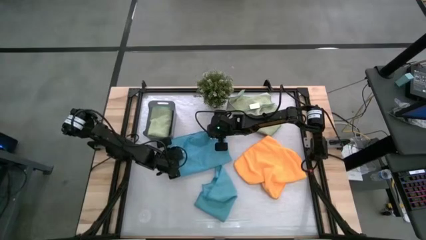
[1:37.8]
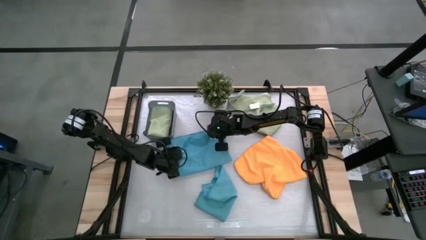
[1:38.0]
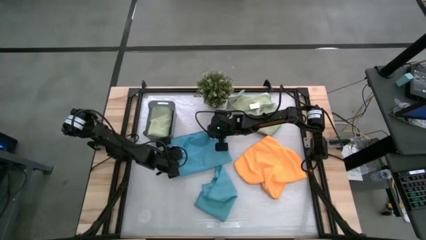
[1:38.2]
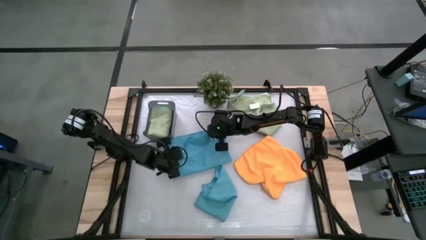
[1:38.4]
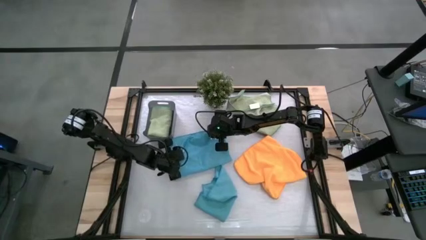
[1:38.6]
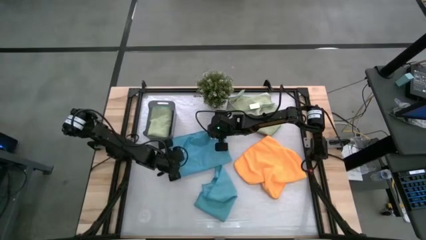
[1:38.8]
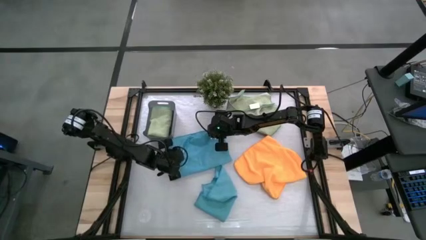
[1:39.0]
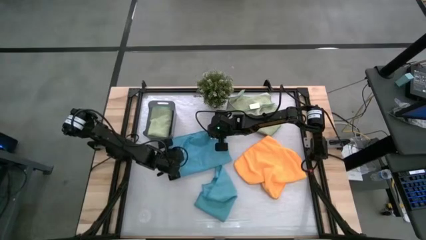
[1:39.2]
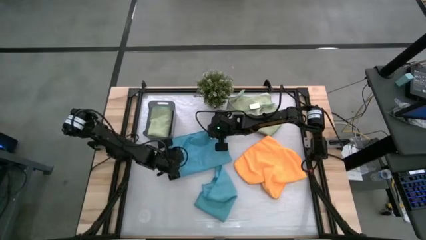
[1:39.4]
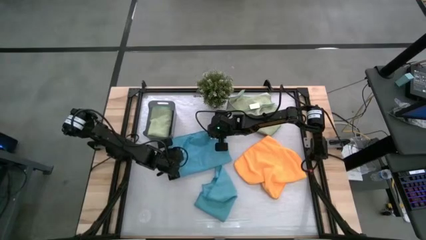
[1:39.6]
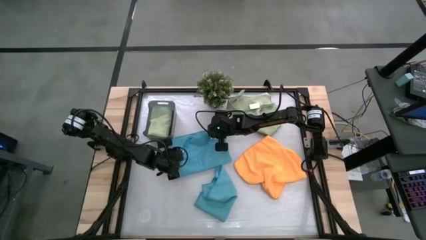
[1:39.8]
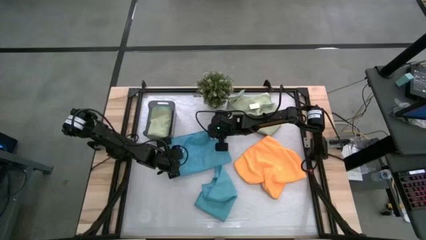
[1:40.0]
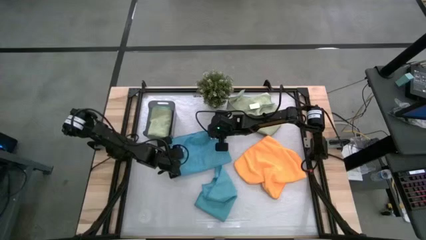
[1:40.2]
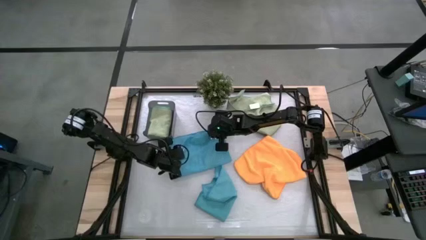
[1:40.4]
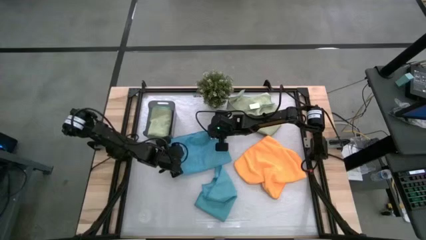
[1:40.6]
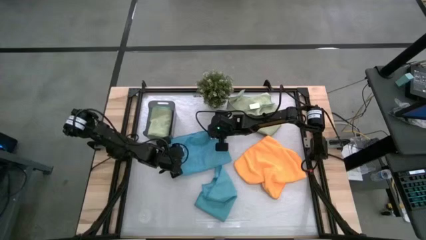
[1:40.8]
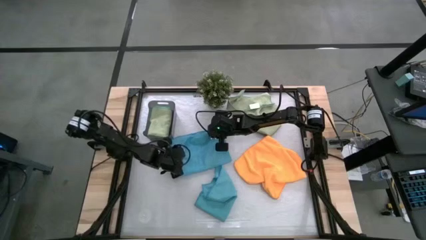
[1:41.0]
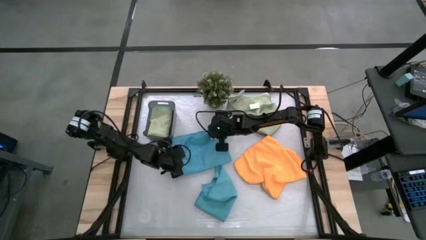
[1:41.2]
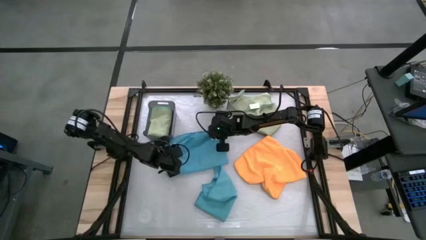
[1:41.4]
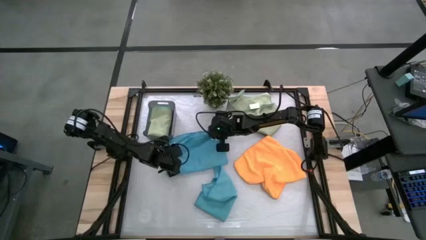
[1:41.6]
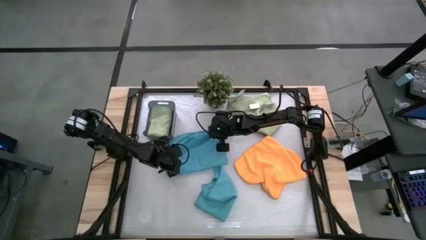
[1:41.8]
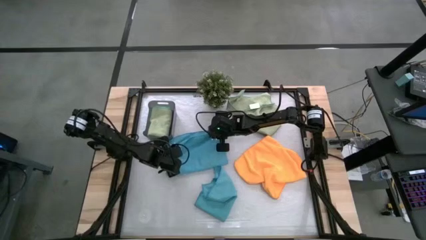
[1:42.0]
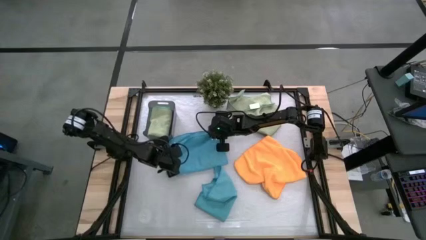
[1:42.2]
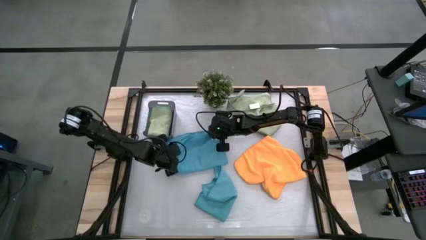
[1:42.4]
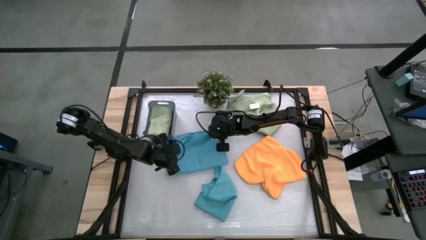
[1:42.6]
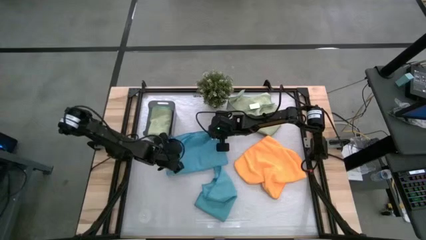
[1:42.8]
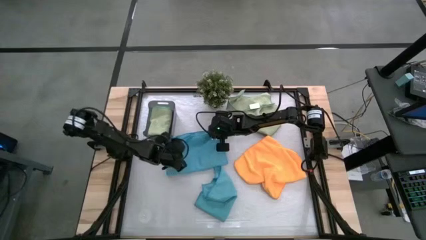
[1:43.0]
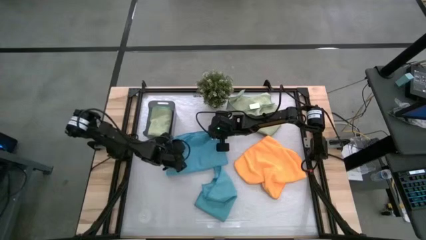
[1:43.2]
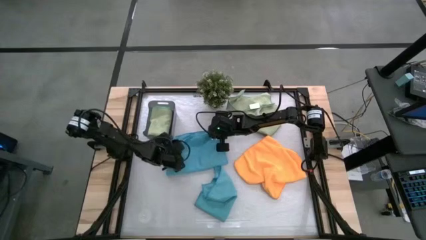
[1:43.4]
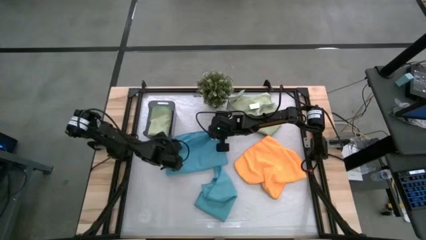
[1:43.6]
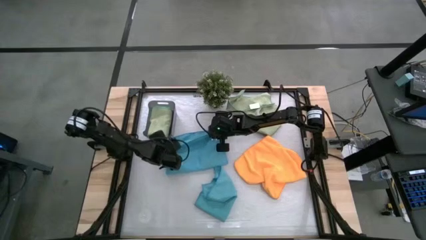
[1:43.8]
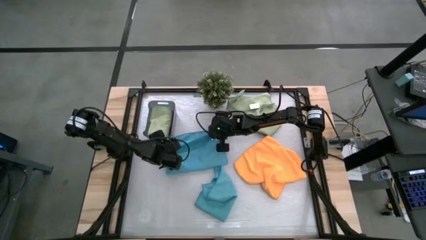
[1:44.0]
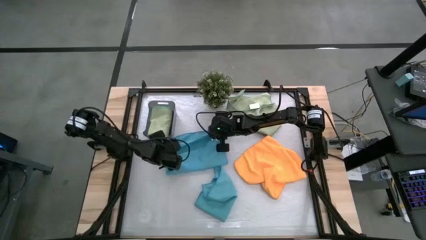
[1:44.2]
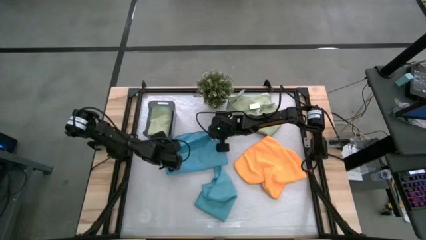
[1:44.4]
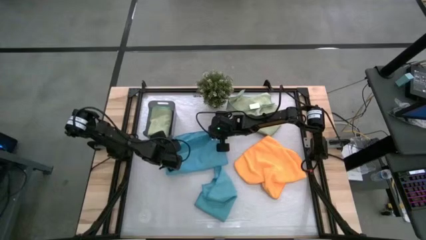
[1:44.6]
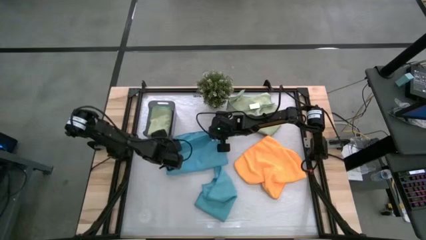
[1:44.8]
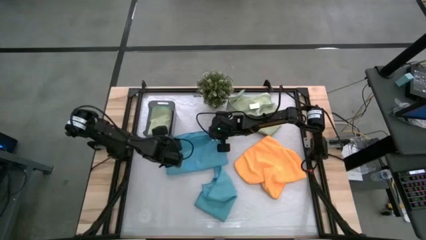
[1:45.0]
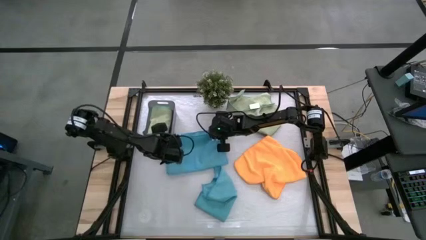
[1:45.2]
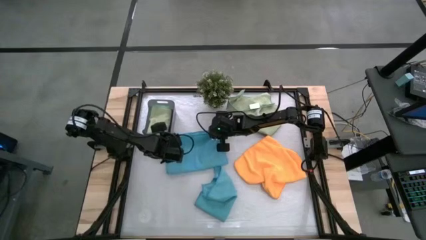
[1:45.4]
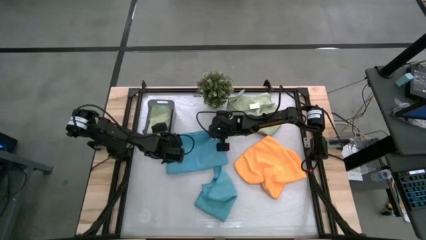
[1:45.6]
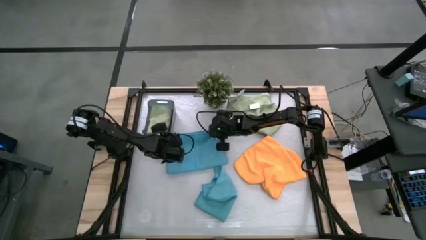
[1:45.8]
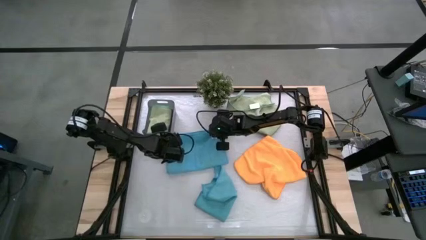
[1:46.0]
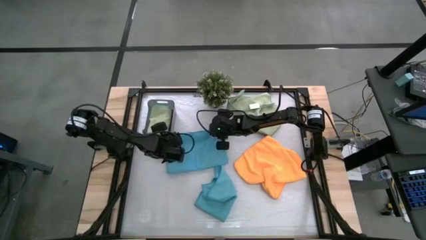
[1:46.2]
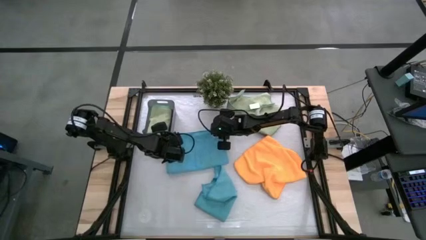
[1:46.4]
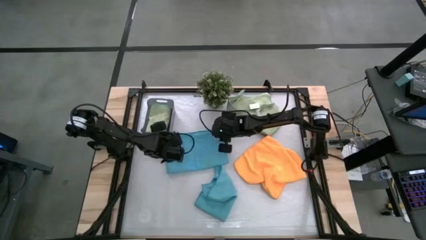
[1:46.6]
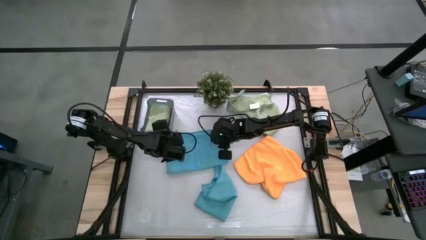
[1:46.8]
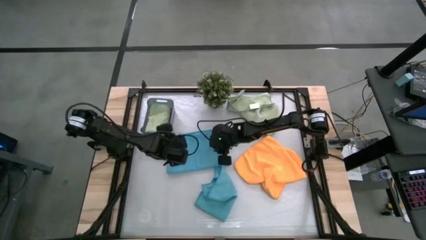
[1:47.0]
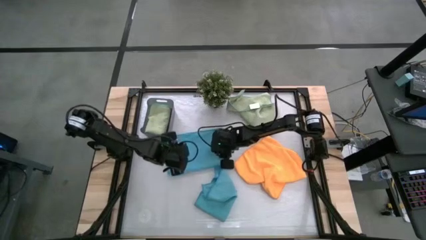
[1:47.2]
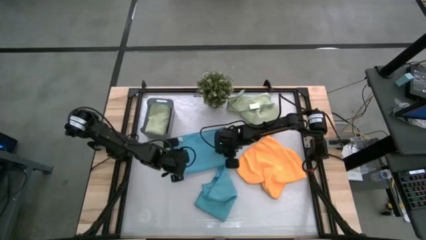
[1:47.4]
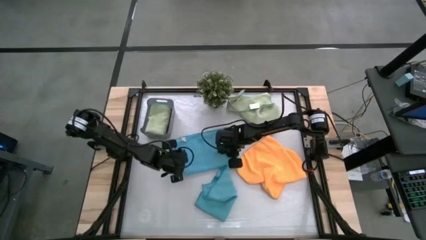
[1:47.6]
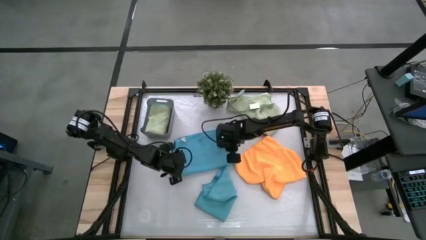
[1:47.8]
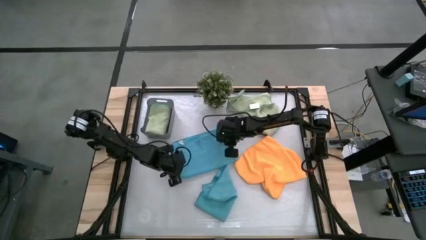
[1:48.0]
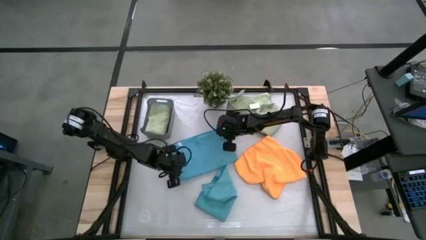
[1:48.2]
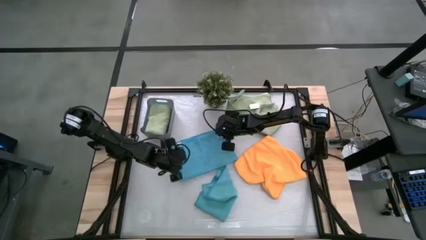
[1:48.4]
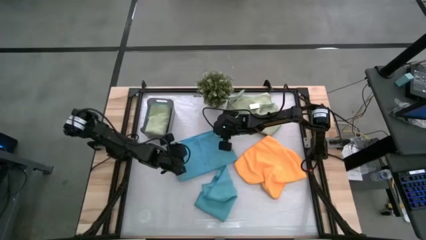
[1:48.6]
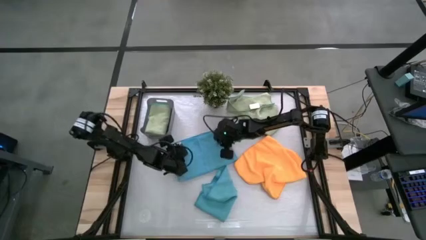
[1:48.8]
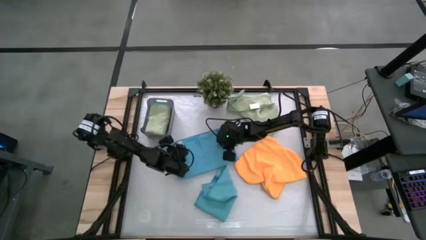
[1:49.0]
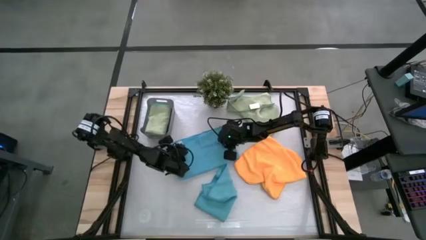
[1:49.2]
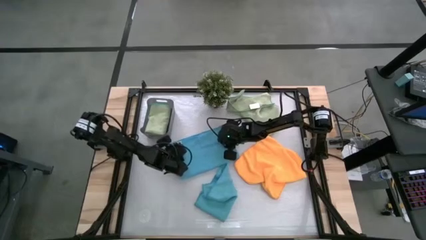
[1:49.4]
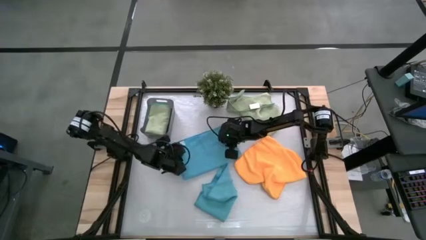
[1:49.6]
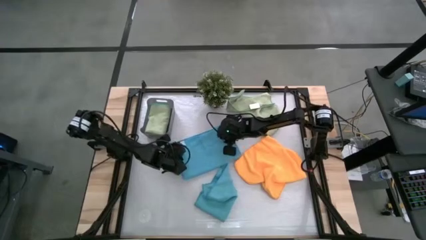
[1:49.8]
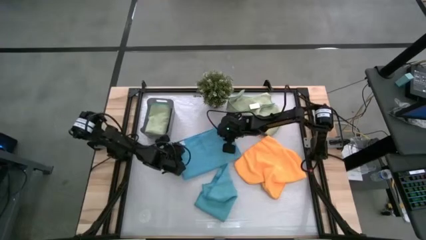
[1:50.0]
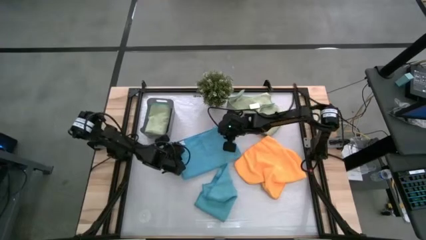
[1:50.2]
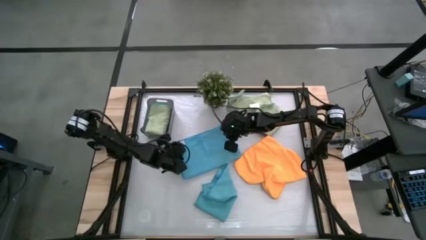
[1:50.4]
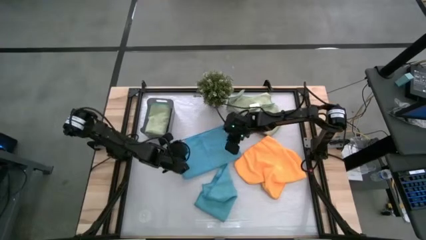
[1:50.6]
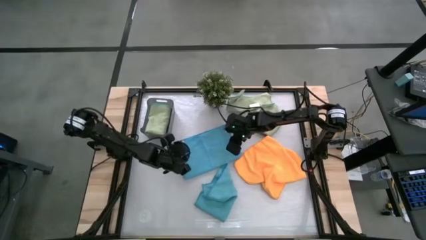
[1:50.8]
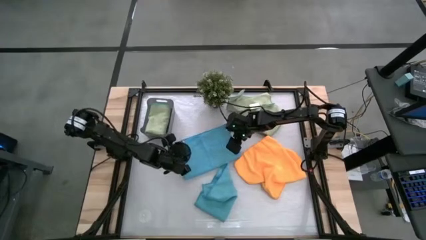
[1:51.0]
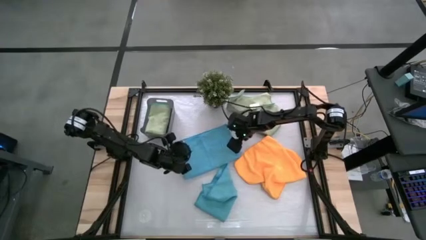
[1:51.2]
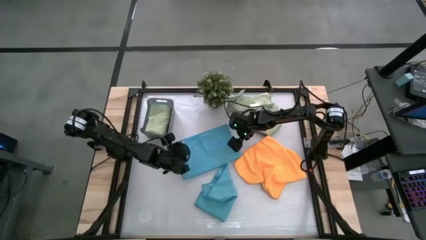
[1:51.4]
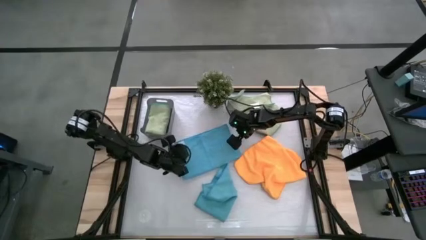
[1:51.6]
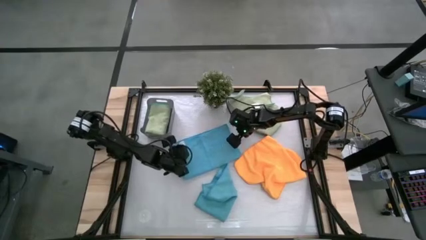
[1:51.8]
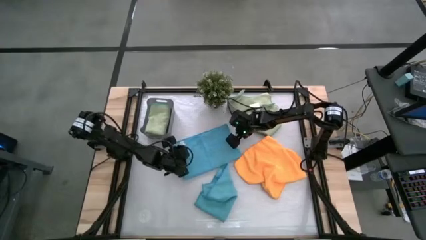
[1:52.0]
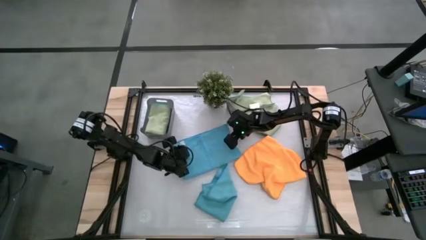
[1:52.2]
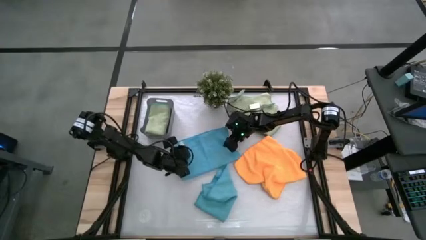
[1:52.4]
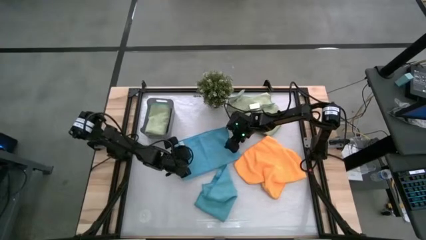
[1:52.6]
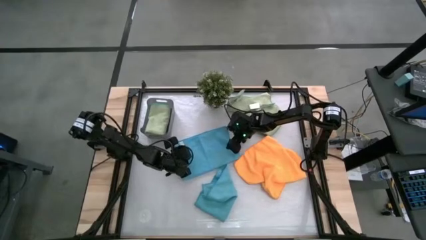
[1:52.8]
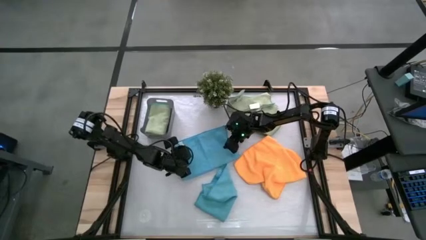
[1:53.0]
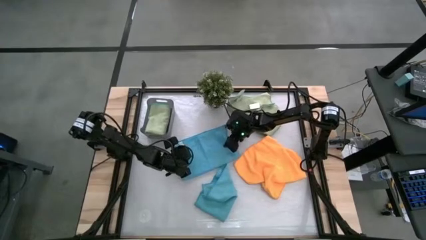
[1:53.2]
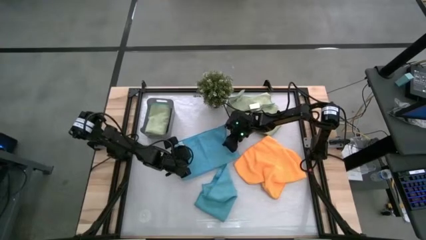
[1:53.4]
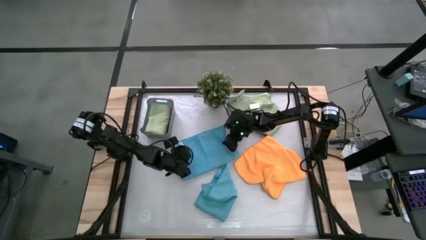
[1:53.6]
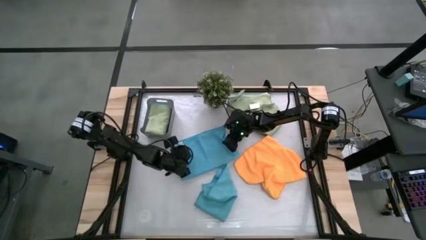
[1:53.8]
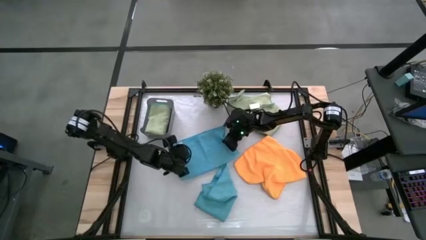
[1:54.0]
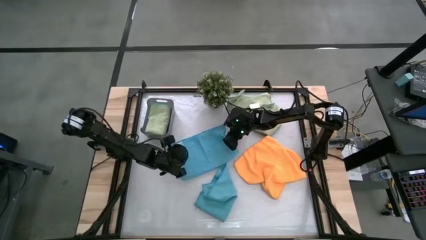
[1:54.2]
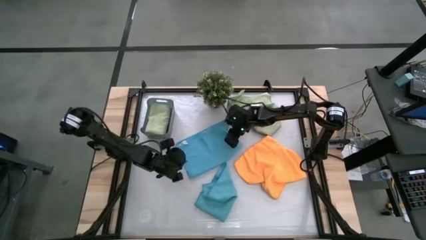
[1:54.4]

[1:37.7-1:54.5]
Task: Fold microfiber towels
Fold the left blue microfiber cloth
